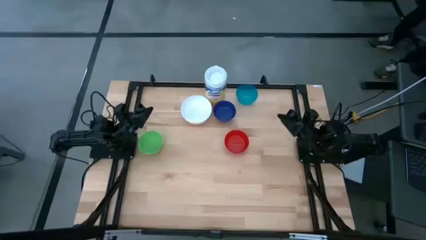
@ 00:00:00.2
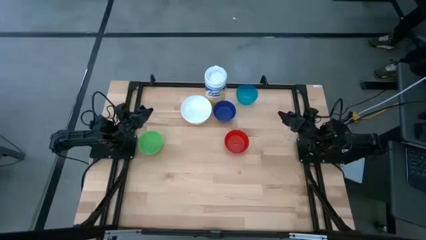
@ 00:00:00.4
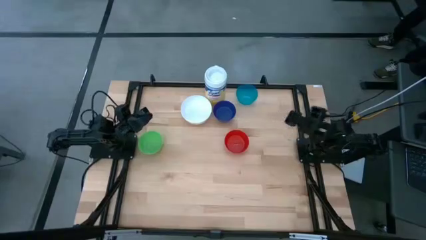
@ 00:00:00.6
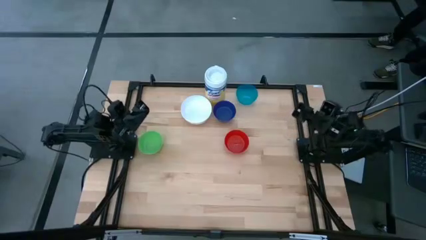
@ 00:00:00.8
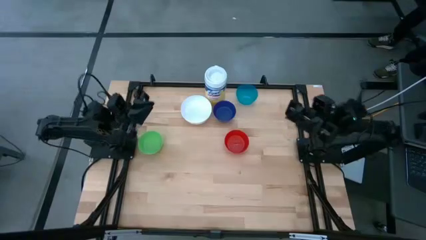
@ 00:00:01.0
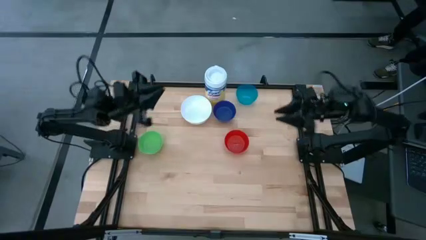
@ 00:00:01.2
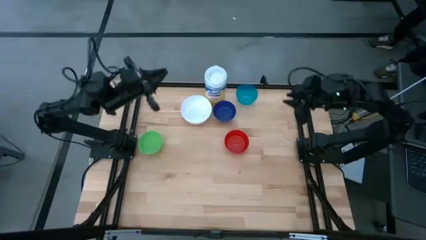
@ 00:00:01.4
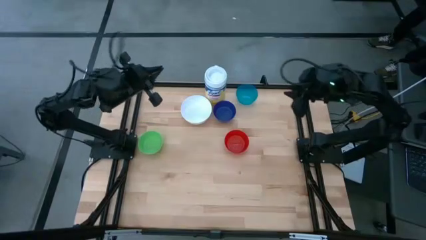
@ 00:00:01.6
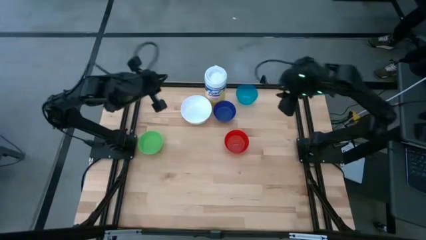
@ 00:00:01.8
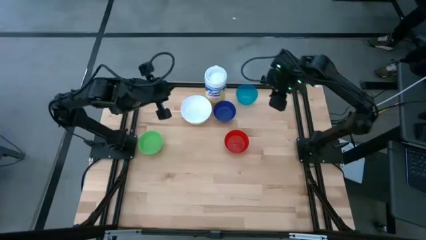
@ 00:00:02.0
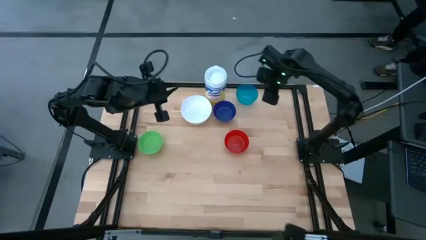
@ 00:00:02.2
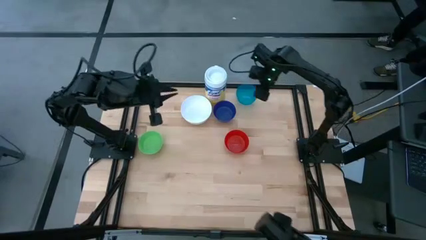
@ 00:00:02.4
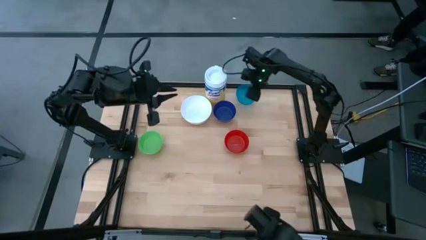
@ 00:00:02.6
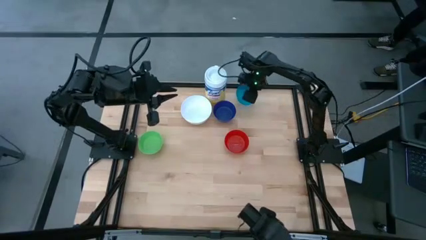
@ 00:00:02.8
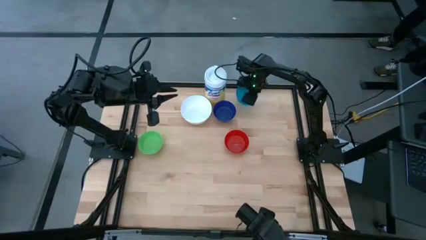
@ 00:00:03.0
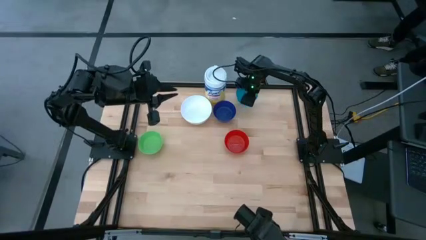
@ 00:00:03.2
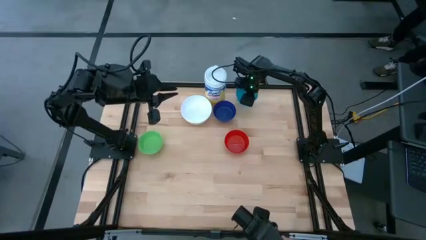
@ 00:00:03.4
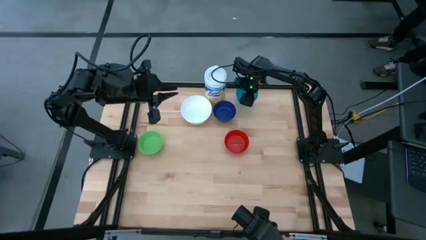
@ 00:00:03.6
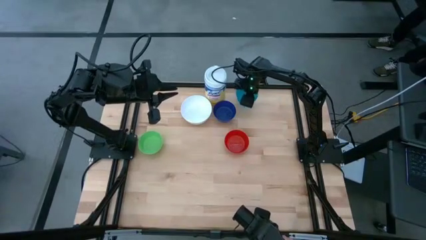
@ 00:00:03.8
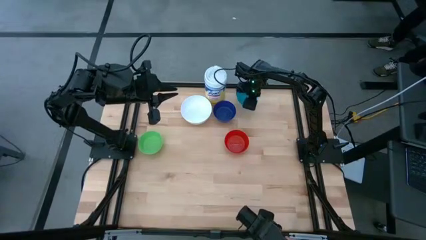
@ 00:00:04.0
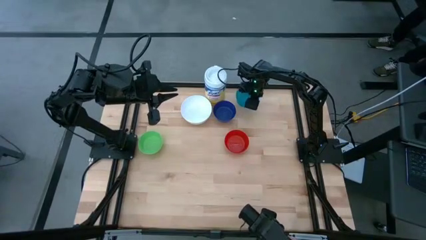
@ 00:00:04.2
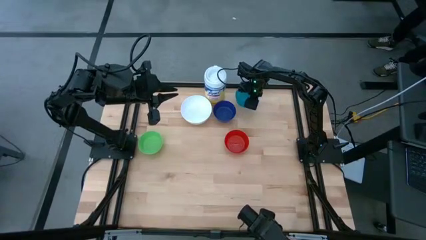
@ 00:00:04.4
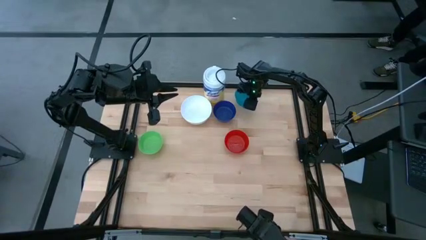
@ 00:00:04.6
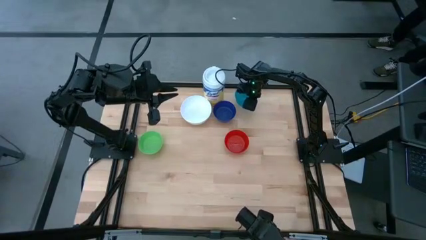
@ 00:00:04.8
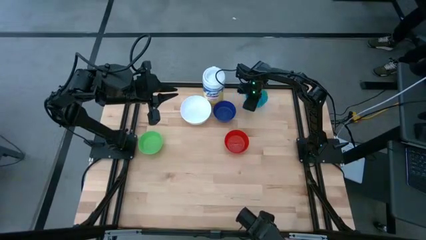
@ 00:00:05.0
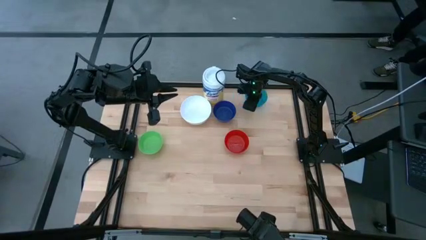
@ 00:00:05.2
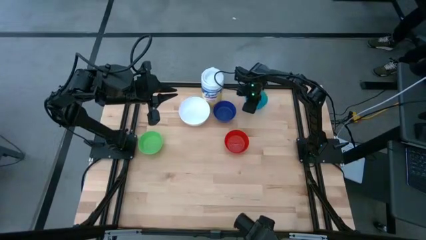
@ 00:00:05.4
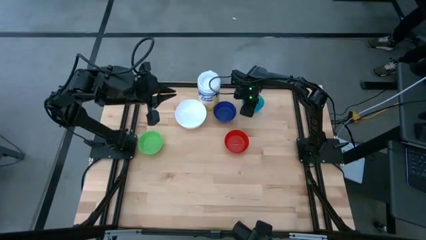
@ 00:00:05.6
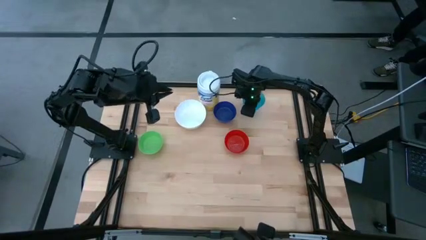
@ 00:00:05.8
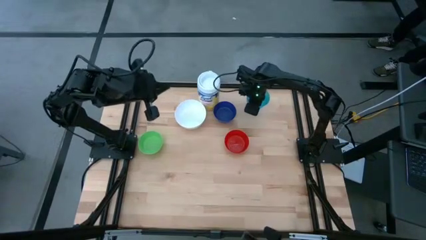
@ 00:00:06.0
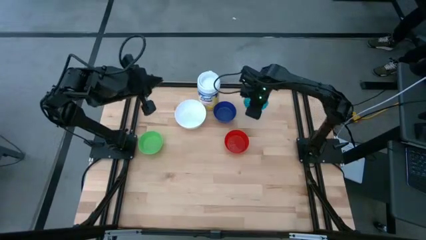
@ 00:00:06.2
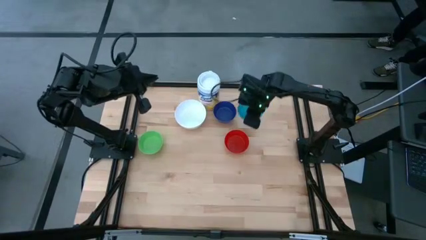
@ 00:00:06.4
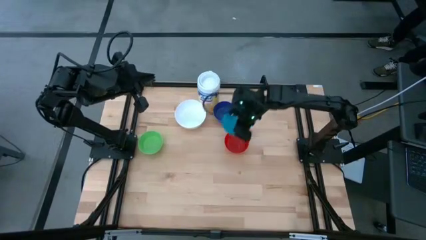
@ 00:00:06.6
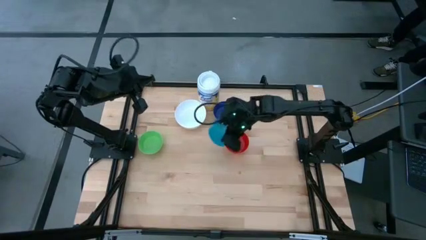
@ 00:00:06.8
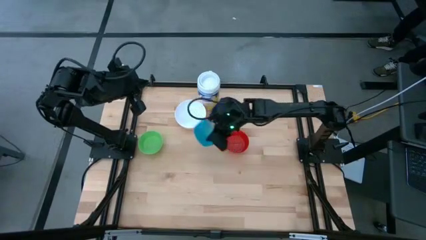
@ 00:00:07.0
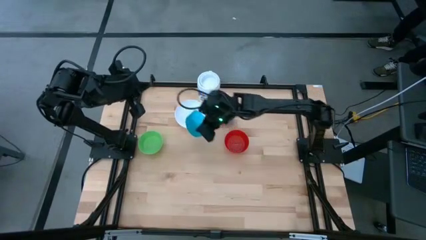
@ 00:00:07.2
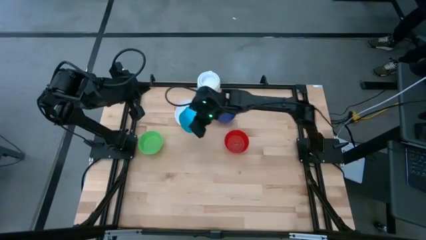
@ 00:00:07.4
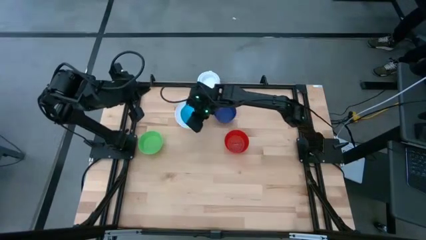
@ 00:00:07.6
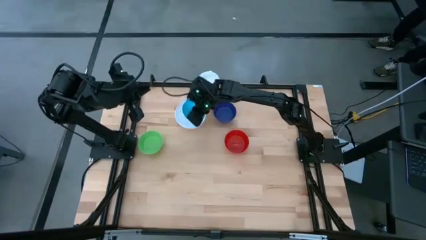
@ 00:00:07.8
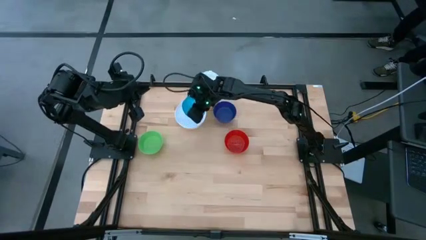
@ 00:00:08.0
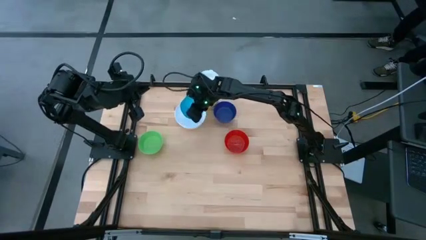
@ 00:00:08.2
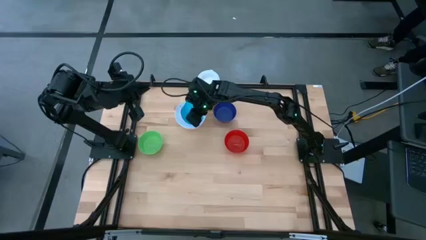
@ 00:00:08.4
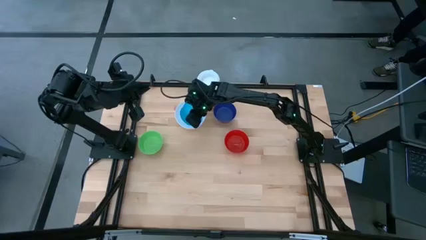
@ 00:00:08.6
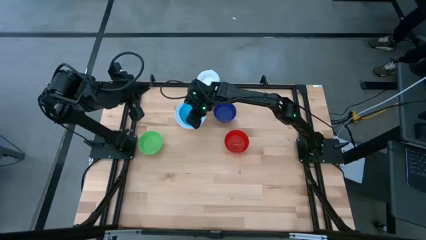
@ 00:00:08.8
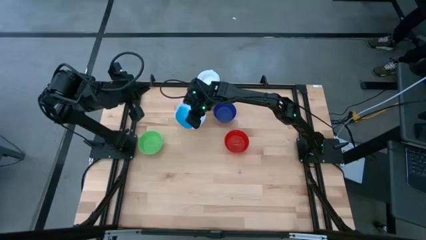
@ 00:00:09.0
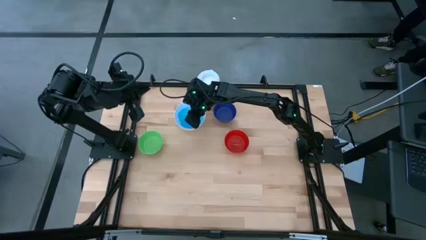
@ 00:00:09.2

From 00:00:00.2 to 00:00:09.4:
Stack the light blue bowl on top of the white bowl

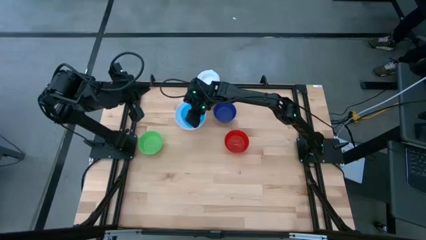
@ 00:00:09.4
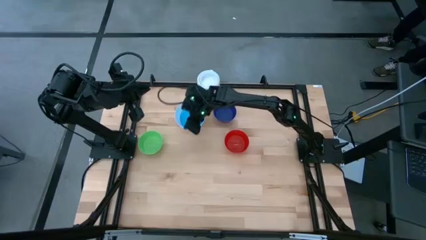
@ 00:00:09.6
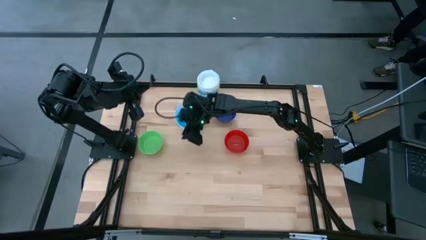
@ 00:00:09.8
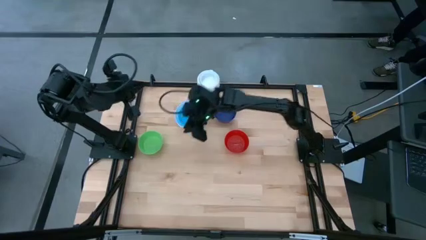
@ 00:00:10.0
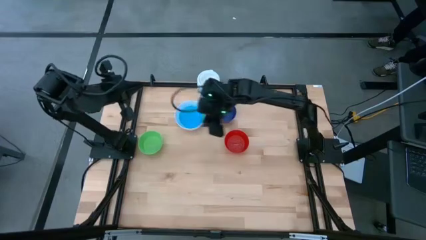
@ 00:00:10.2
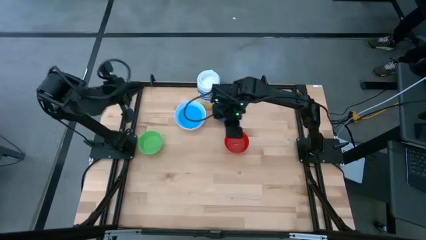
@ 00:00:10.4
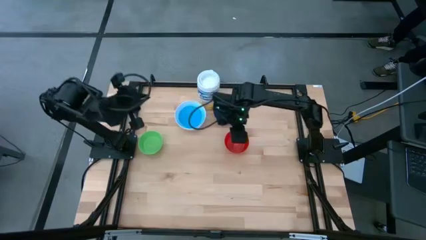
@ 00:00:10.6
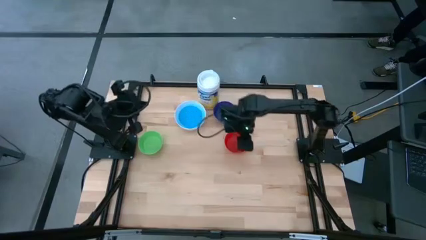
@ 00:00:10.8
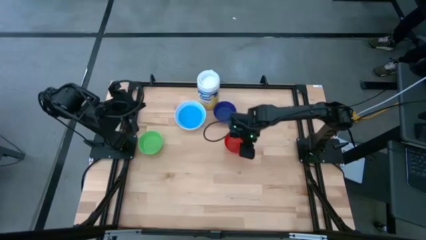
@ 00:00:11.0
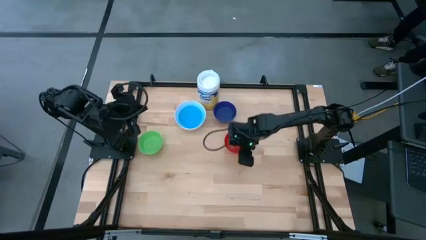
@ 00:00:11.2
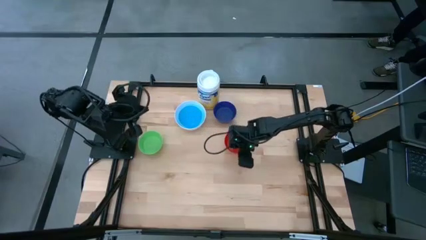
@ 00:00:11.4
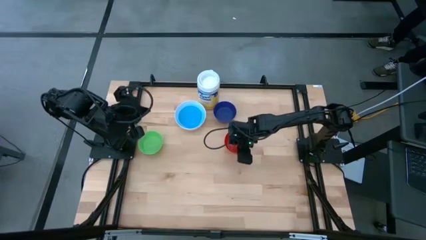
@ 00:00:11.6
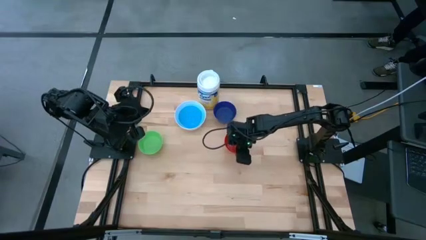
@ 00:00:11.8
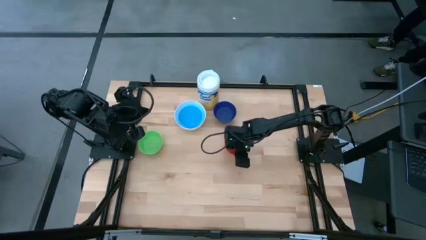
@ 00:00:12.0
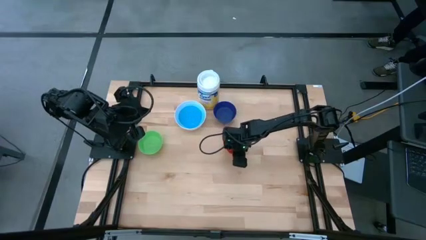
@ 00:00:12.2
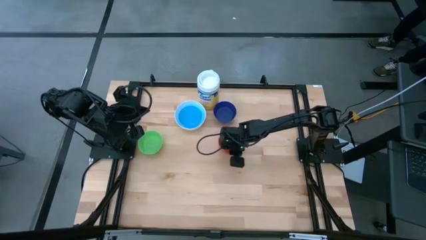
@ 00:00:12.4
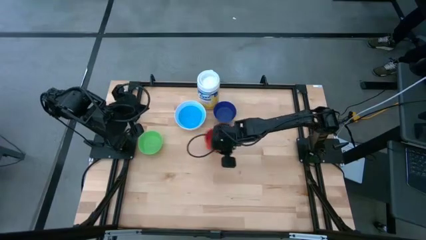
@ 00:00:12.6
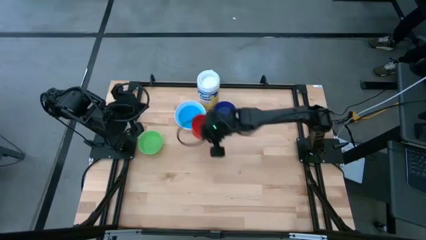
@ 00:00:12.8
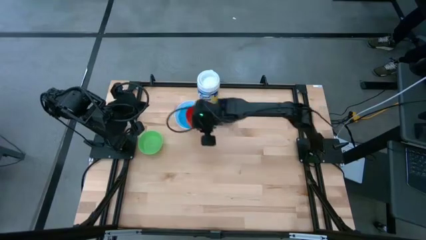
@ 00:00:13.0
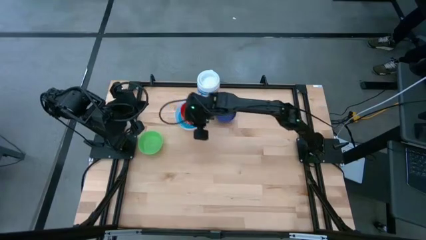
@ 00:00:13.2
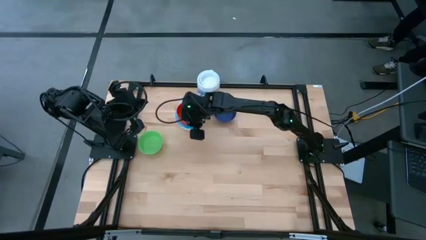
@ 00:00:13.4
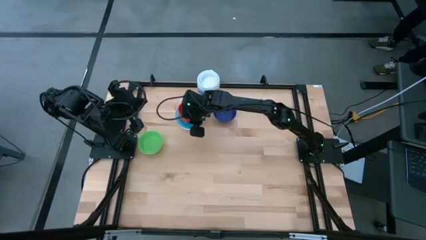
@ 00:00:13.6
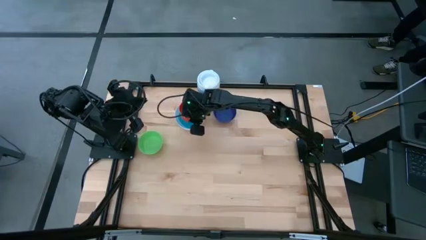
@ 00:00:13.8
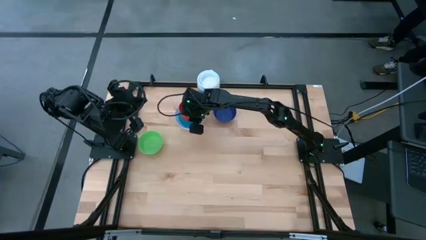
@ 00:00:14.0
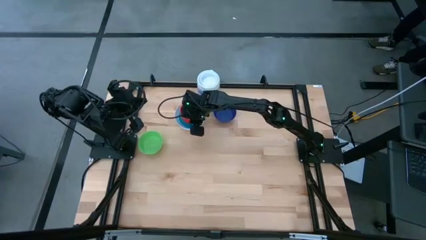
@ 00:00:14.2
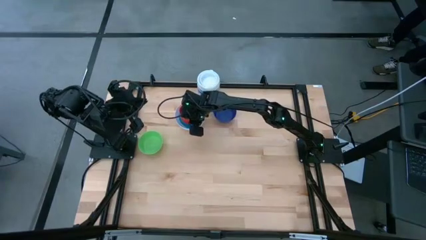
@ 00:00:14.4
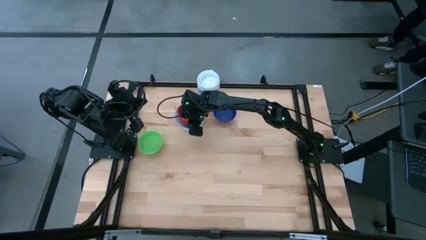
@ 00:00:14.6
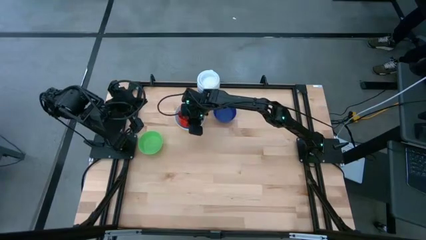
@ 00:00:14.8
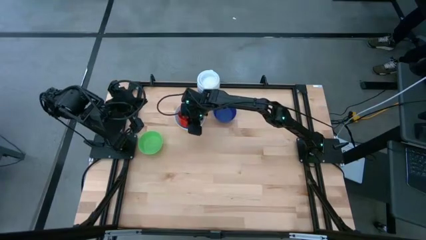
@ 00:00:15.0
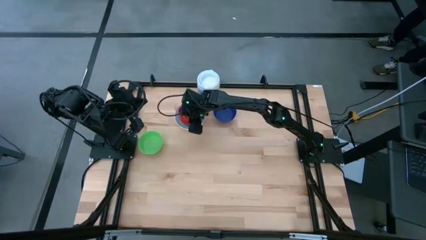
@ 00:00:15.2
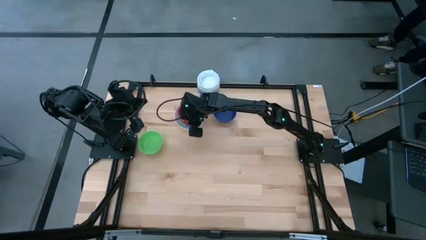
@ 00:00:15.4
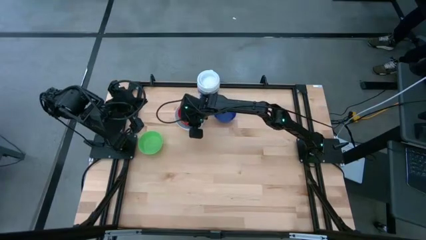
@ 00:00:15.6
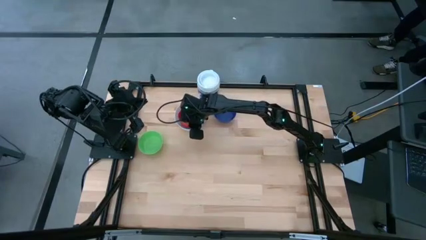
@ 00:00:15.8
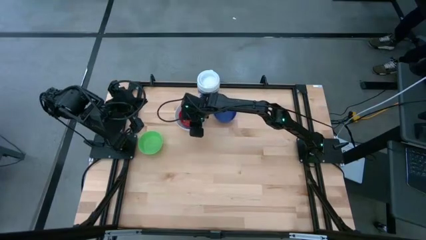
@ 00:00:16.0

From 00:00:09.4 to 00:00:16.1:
Stack the red bowl on top of the light blue bowl
